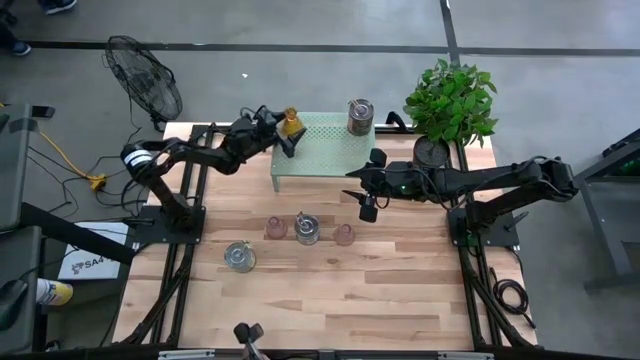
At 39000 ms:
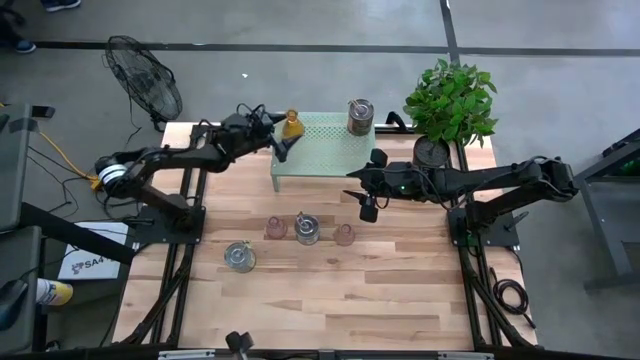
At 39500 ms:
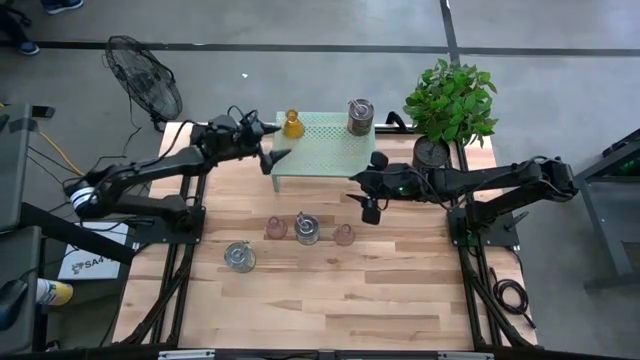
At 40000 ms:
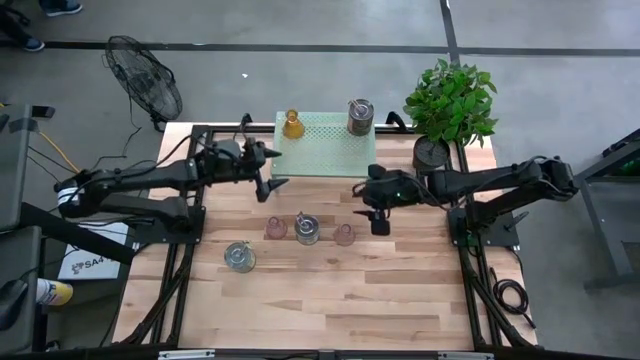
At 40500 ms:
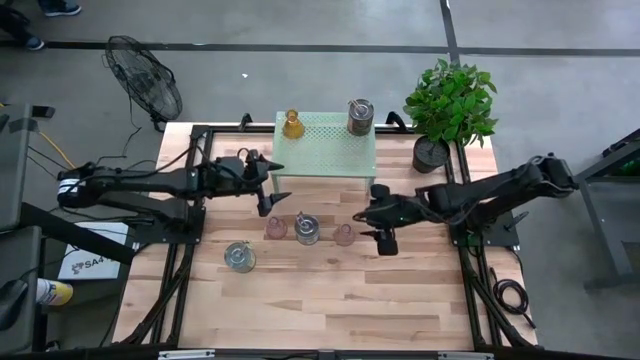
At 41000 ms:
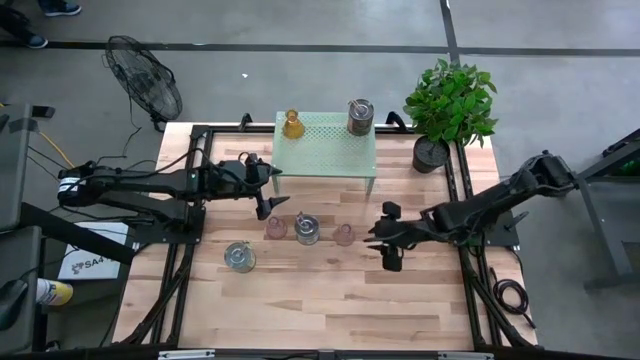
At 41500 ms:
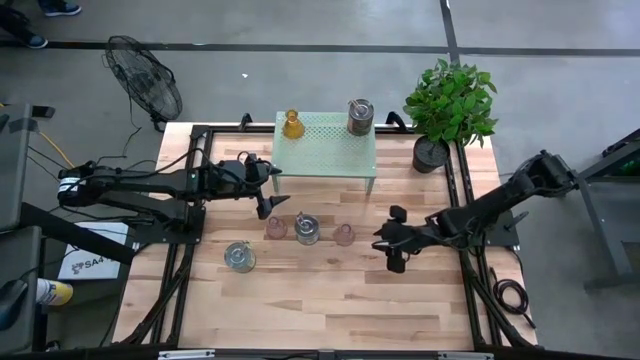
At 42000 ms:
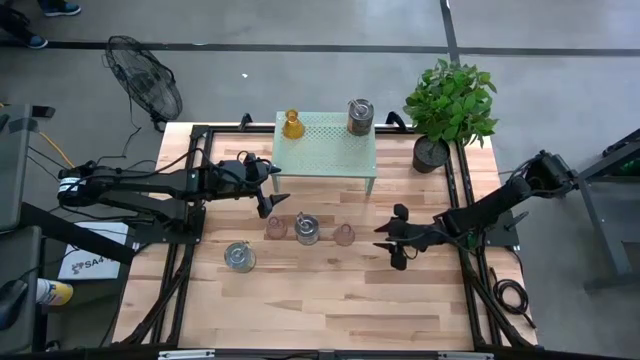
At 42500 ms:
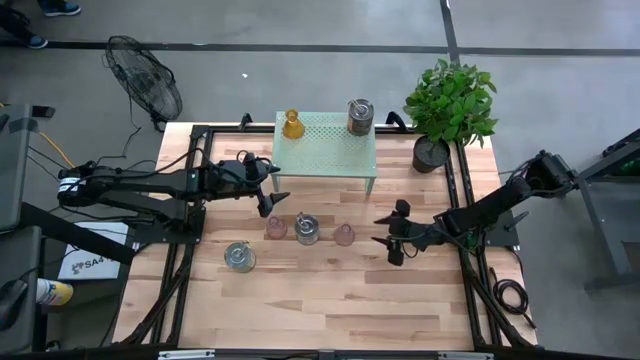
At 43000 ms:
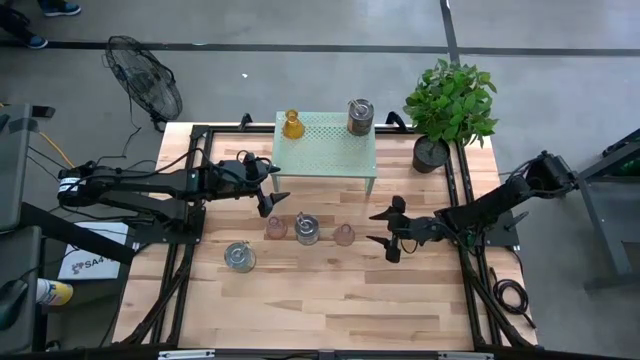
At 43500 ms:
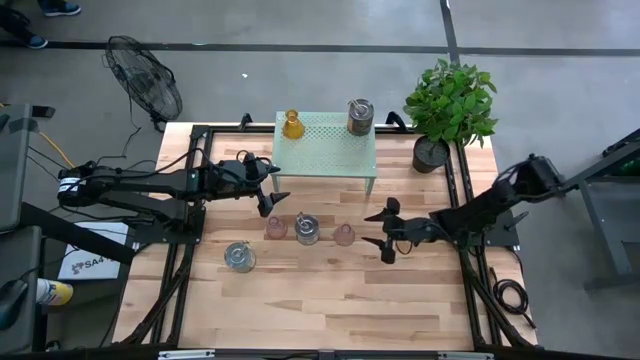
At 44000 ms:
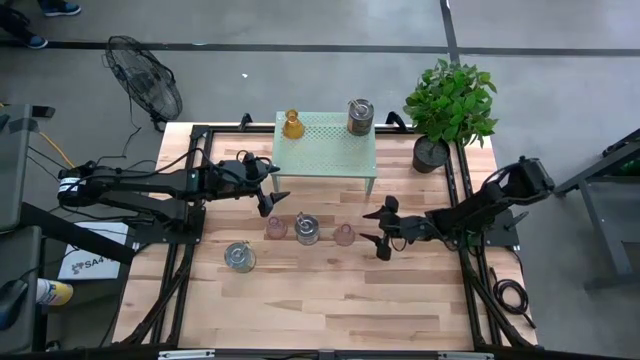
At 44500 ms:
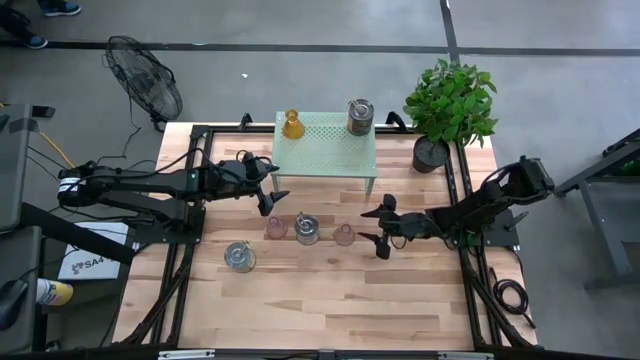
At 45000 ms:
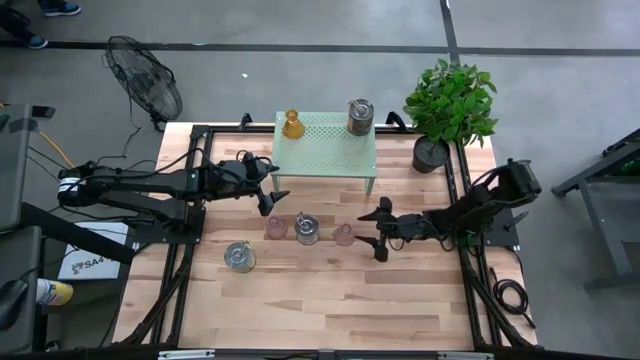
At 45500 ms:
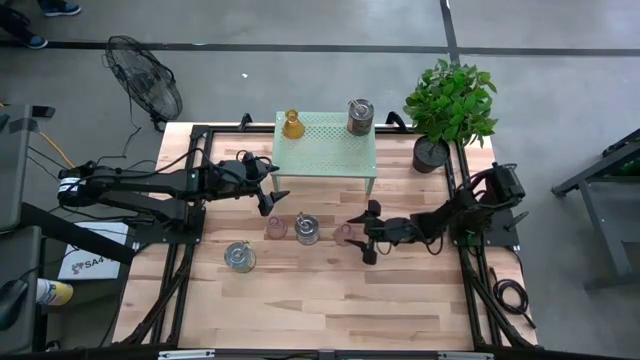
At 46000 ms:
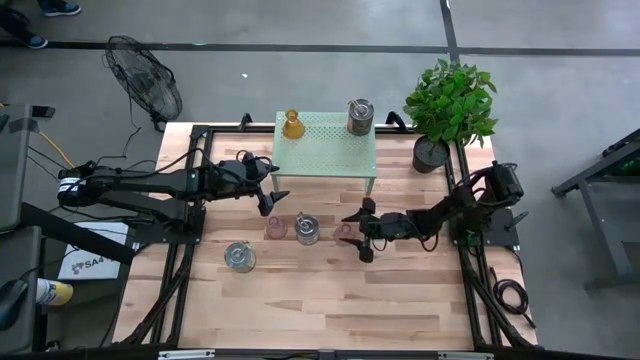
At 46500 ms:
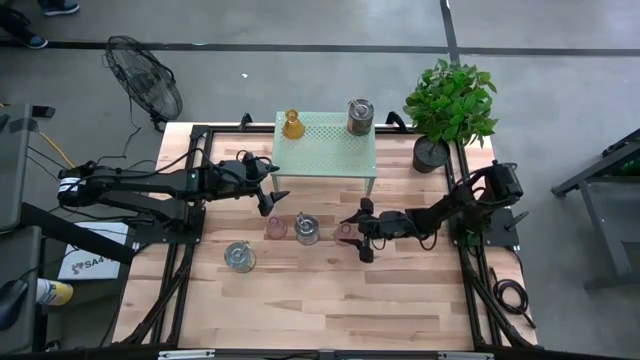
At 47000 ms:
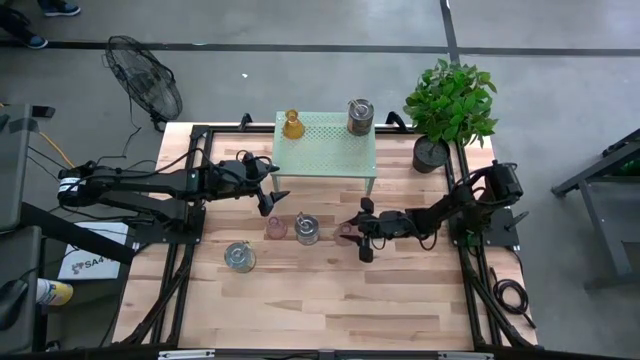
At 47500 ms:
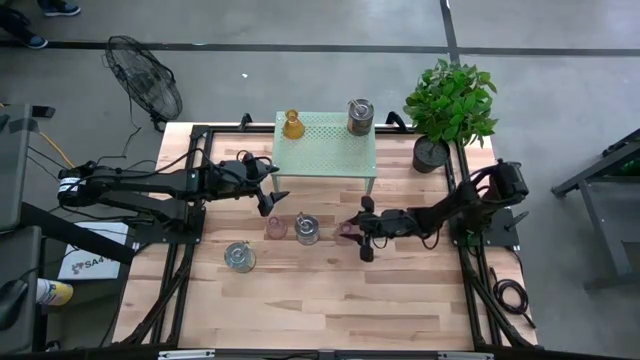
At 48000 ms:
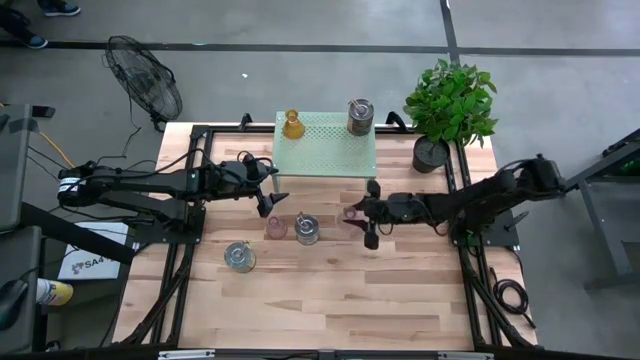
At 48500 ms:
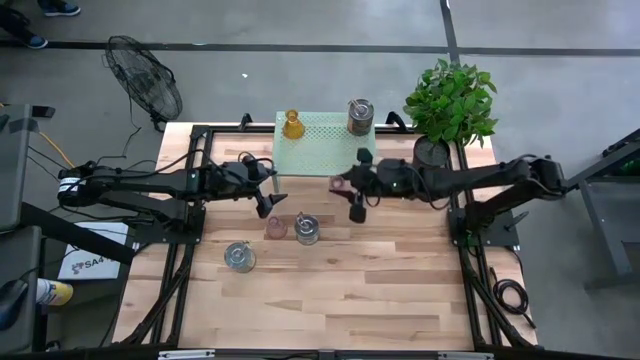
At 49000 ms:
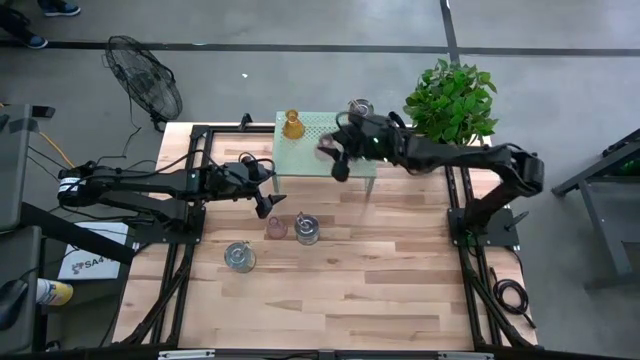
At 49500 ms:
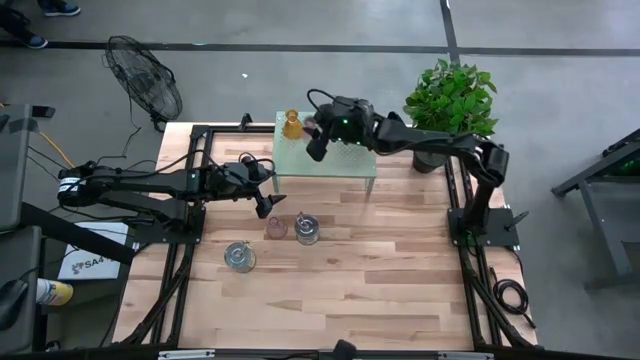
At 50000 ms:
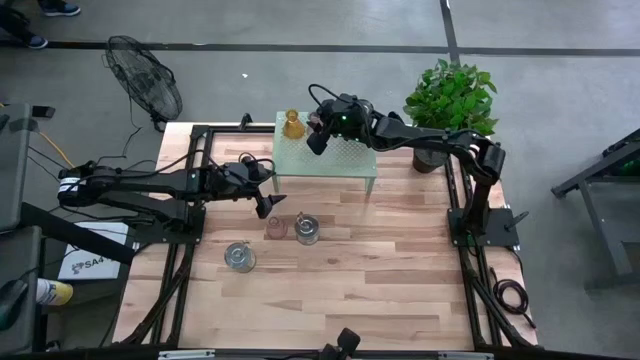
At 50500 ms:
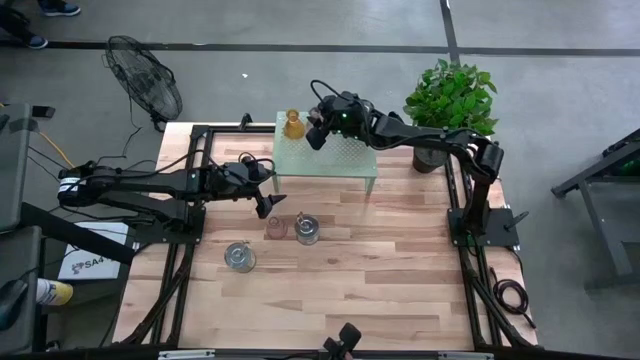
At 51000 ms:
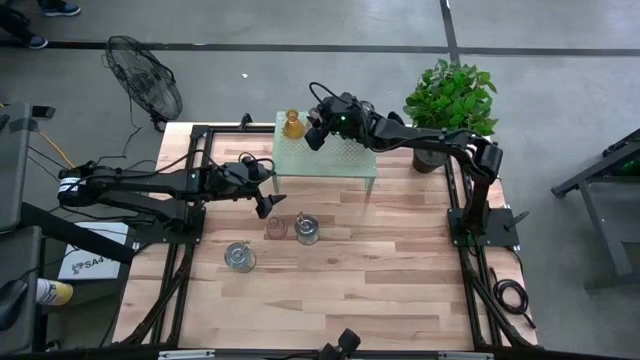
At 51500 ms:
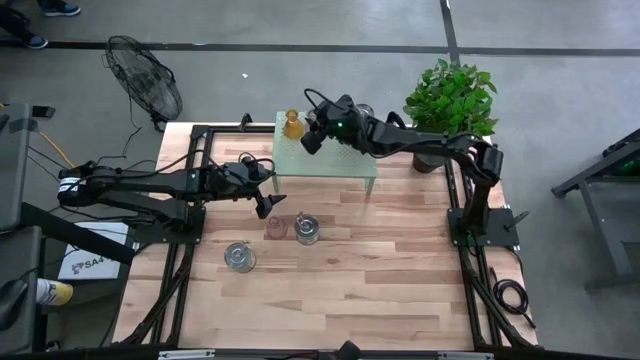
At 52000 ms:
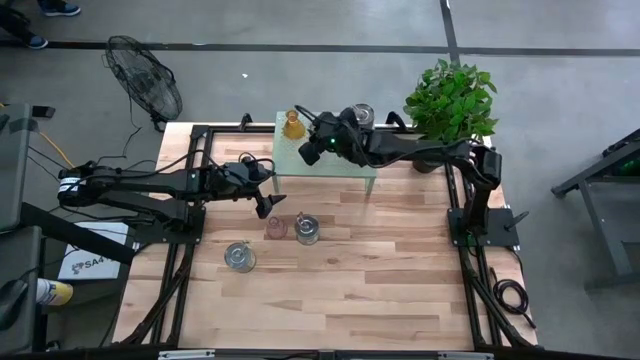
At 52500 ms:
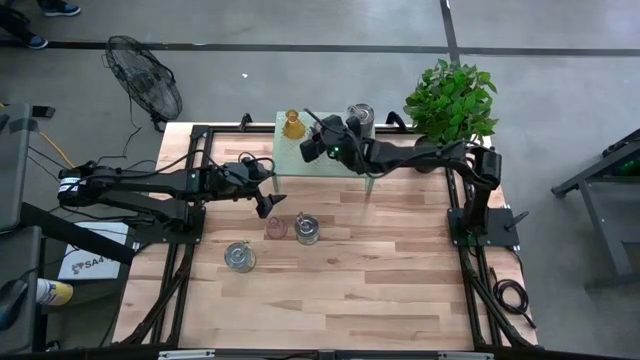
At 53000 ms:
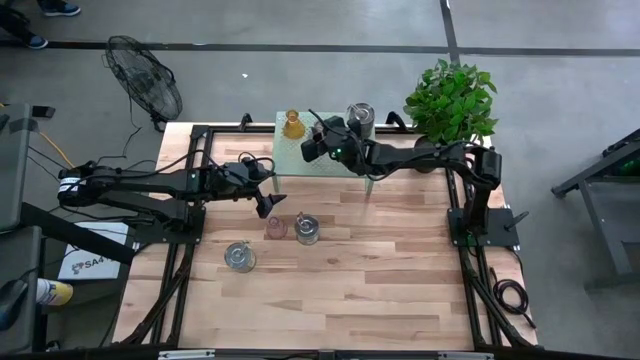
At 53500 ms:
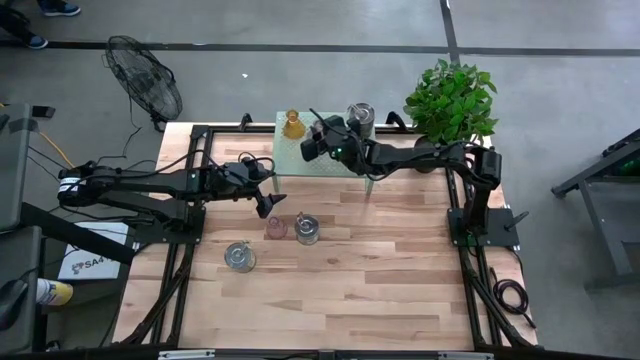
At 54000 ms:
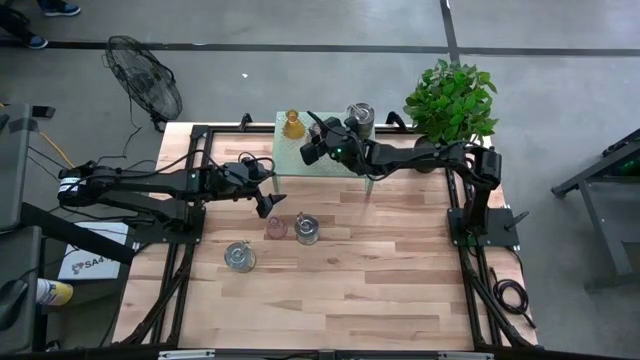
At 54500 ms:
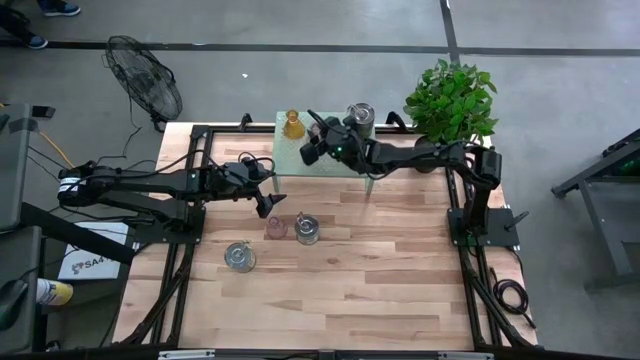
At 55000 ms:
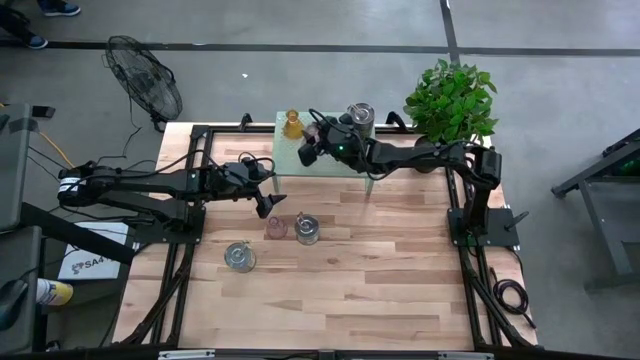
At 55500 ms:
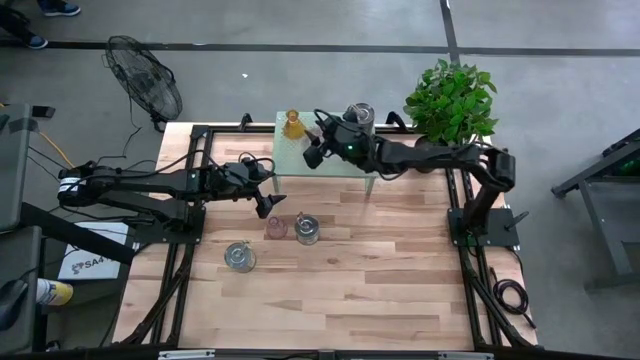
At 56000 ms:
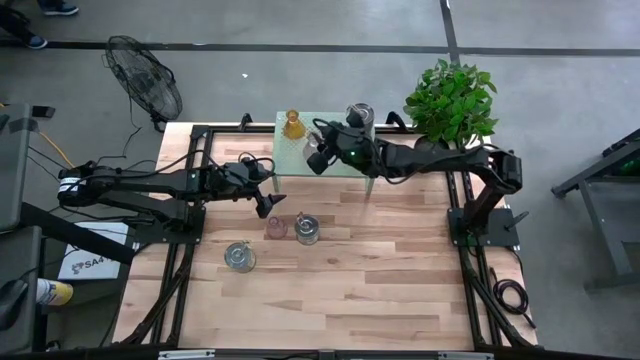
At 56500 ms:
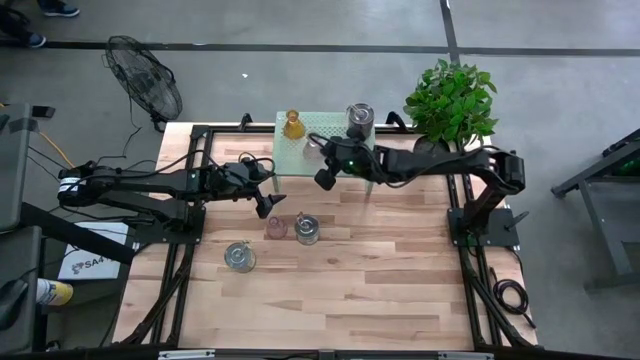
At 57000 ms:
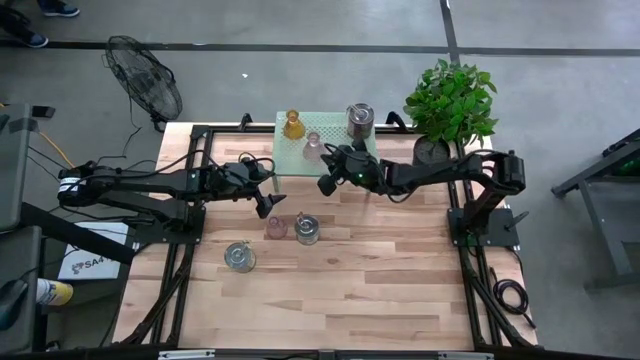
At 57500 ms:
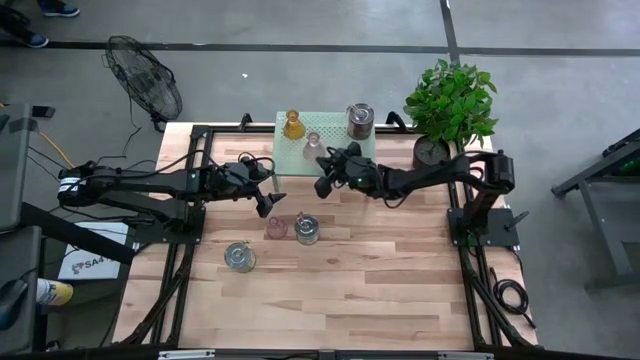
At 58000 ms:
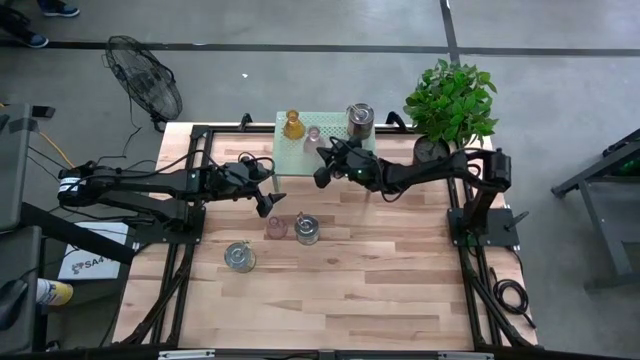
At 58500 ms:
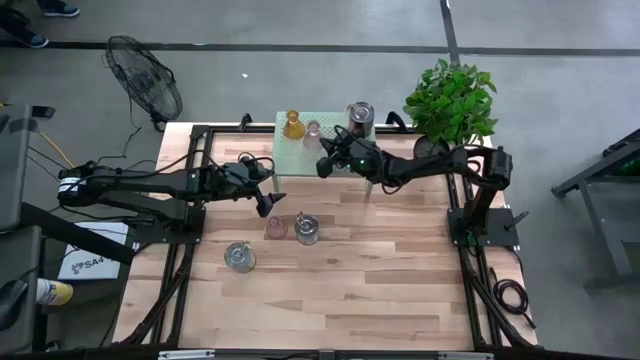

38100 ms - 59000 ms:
Task: Pick & Place candle stick holders
Put the right purple candle holder on the shelf
